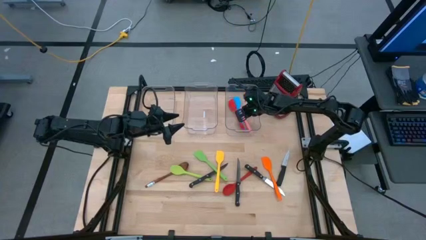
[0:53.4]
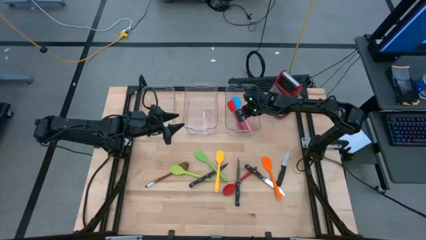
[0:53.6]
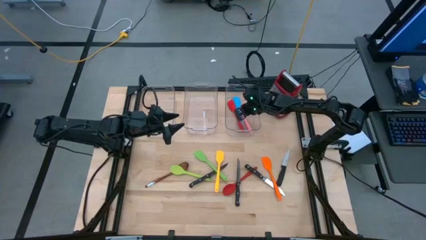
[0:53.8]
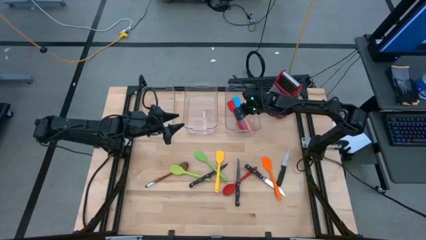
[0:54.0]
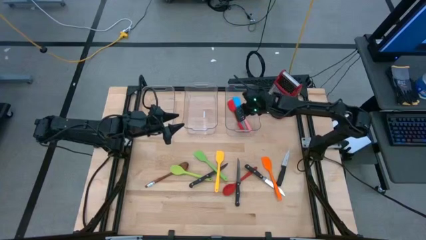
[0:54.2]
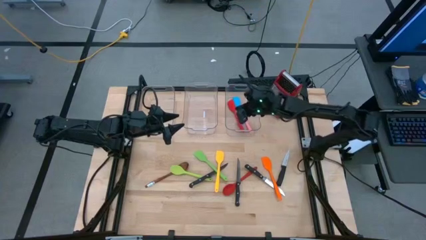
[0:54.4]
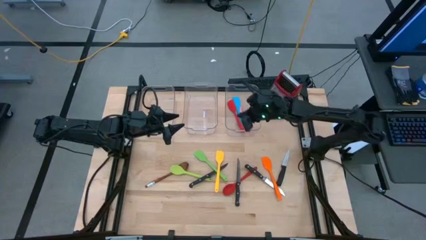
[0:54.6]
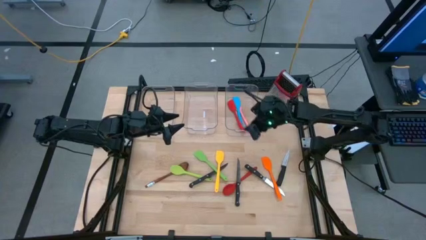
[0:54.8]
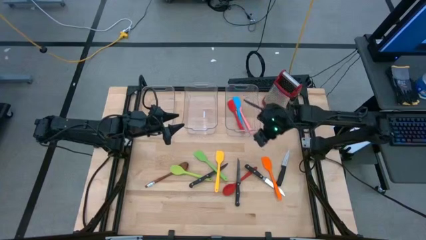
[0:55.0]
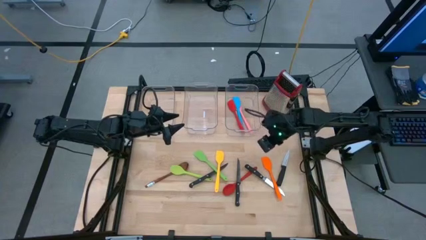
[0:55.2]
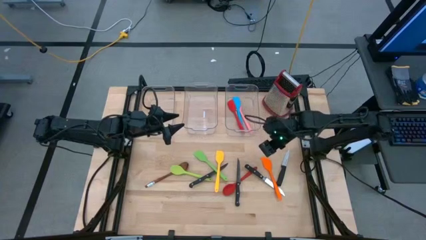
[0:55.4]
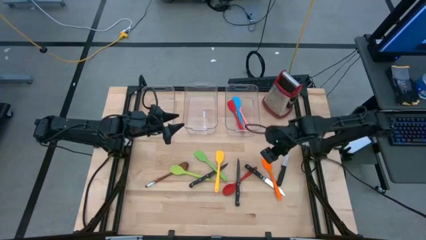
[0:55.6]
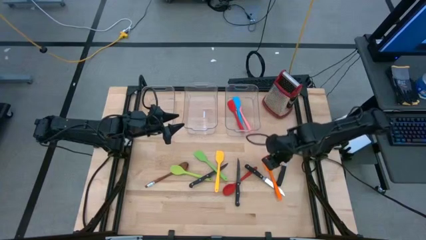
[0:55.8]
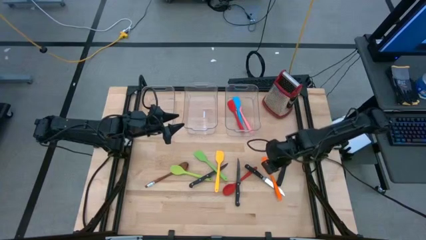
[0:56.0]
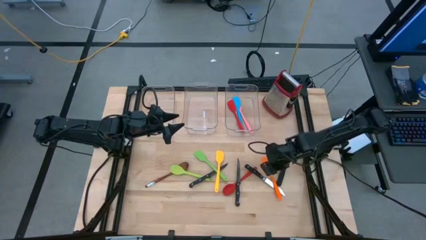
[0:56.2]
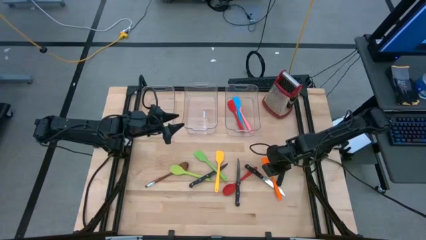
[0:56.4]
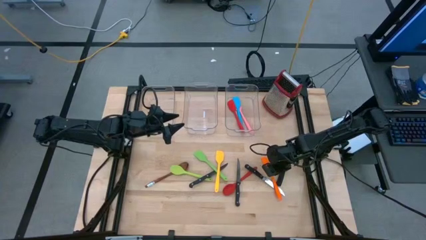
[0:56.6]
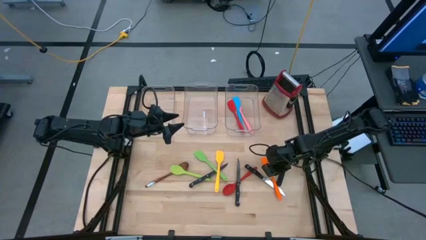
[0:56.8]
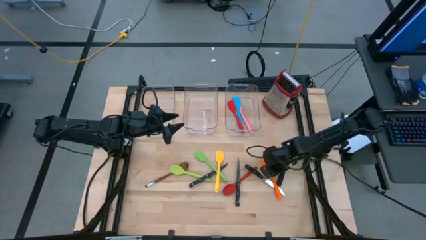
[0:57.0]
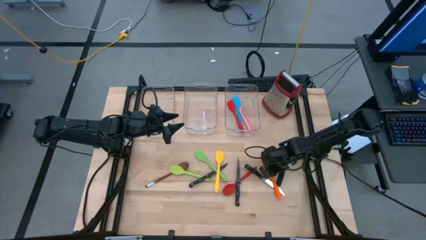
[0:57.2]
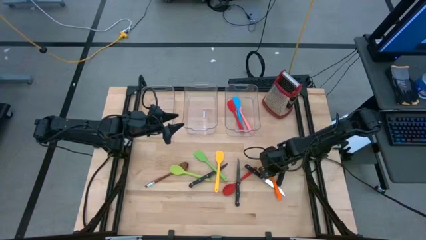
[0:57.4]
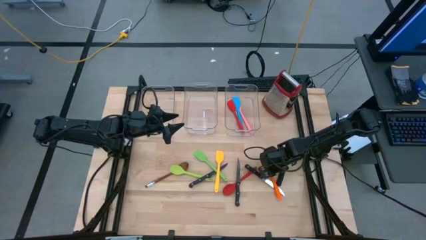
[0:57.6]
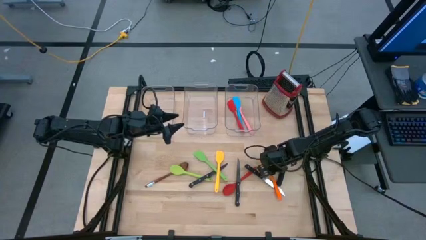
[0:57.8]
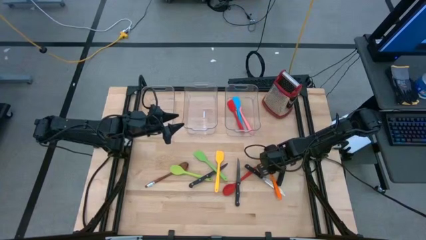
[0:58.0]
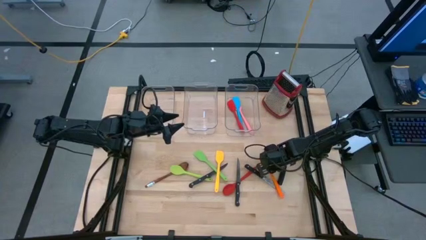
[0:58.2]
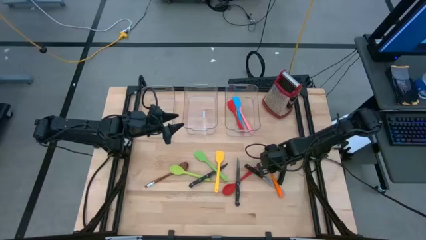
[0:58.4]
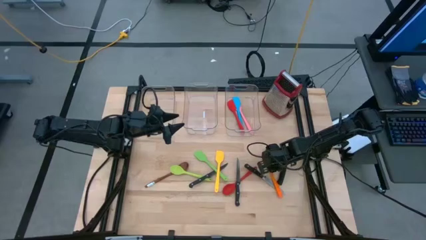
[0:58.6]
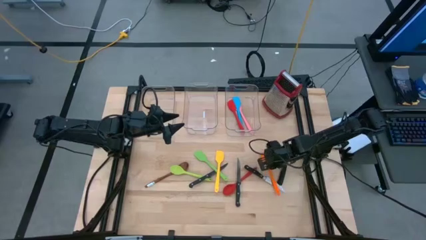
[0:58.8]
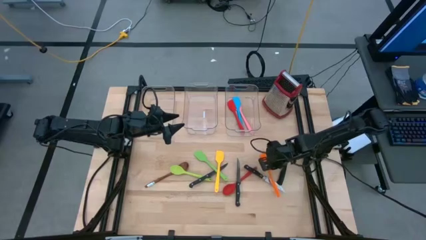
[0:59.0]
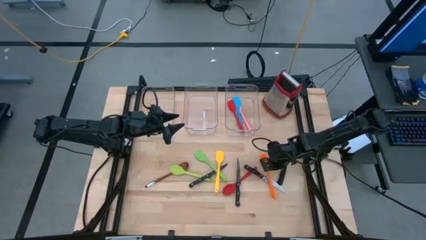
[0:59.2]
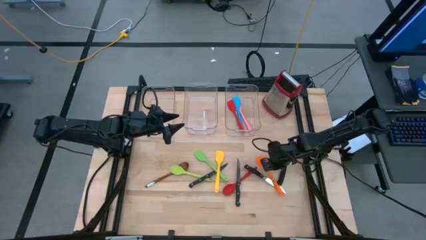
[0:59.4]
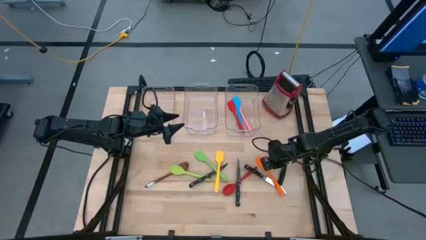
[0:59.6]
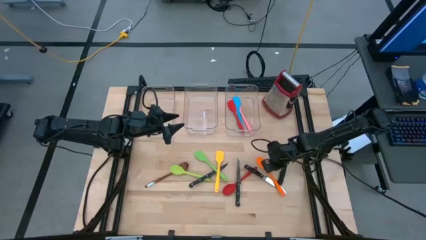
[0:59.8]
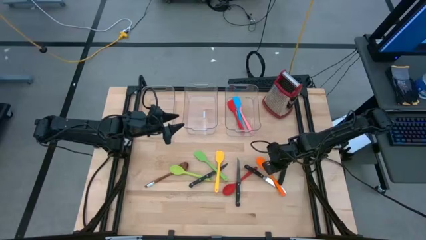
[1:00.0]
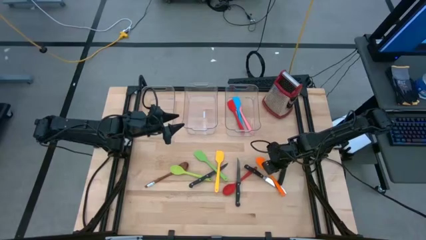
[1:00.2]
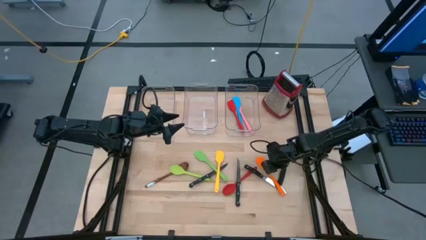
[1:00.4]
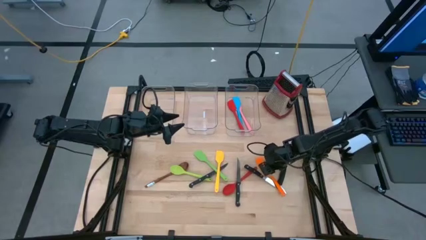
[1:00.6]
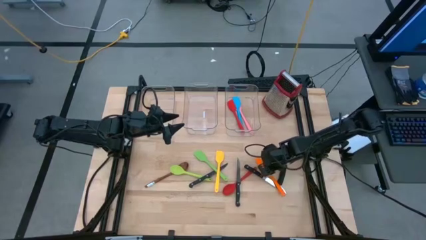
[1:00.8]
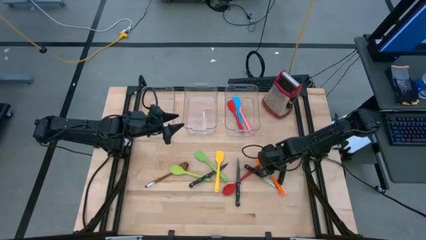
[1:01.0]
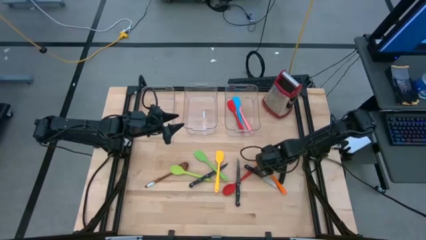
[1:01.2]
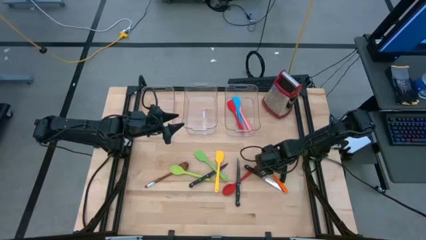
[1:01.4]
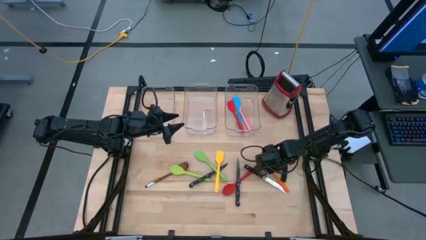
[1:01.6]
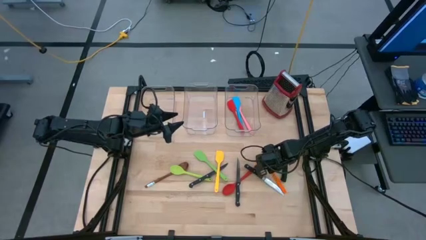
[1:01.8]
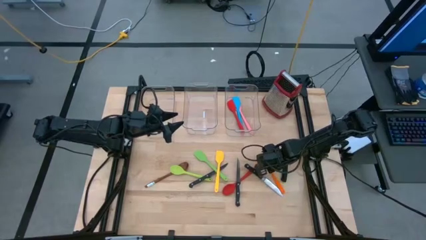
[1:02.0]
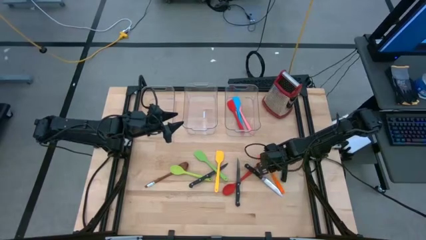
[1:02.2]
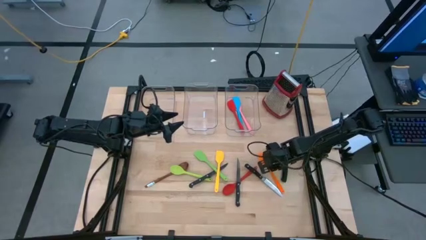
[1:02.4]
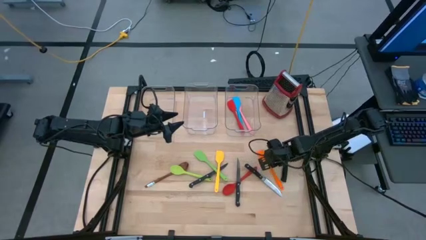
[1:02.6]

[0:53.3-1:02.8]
Task: Pick & Place Kitchen Items
Put the orange spatula into the right transparent bin

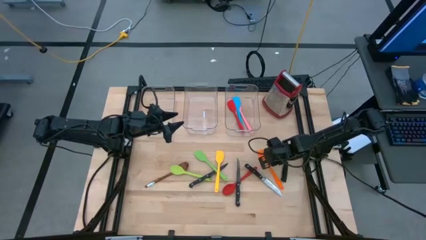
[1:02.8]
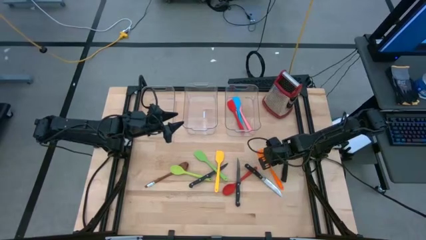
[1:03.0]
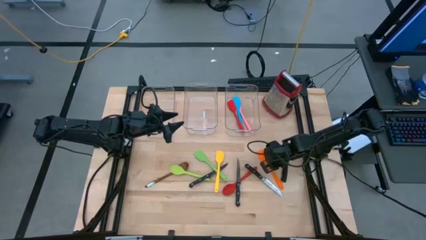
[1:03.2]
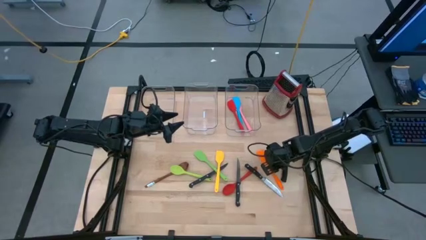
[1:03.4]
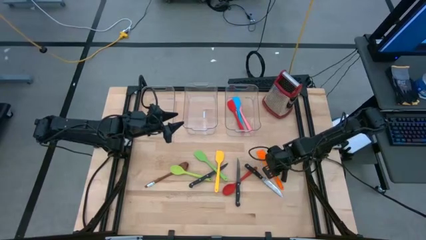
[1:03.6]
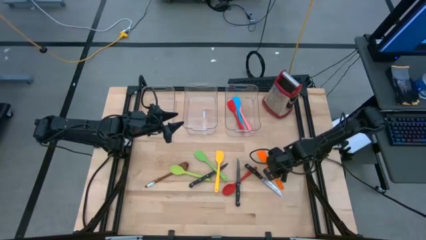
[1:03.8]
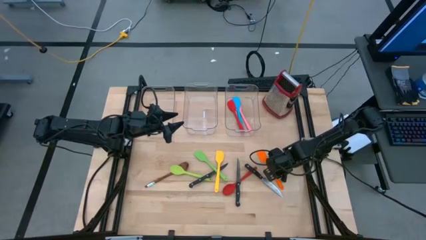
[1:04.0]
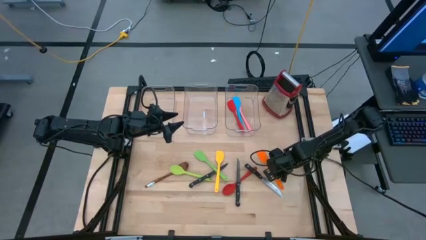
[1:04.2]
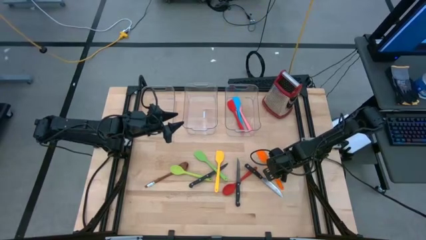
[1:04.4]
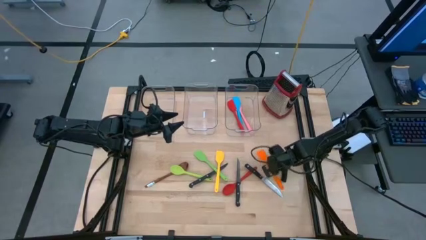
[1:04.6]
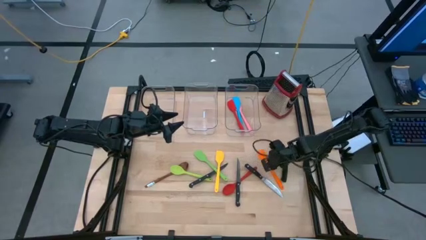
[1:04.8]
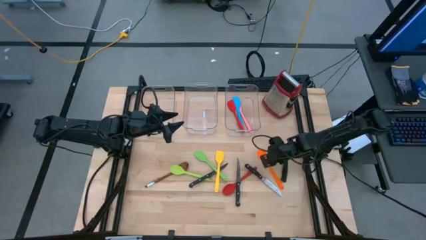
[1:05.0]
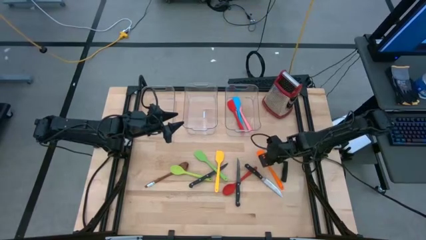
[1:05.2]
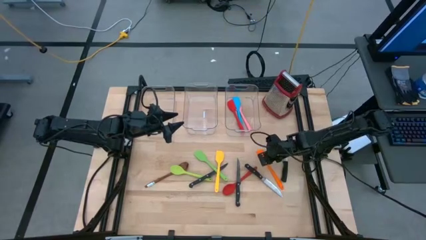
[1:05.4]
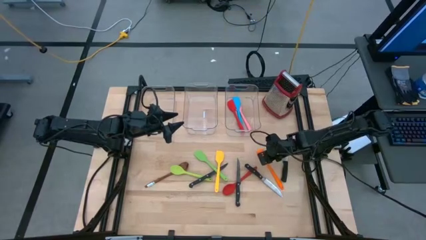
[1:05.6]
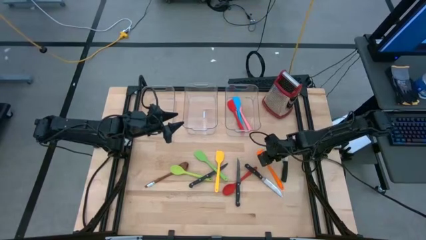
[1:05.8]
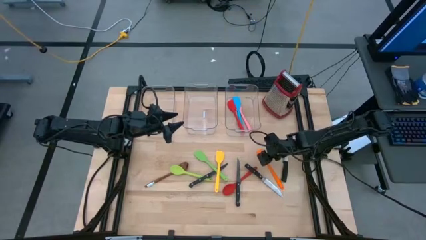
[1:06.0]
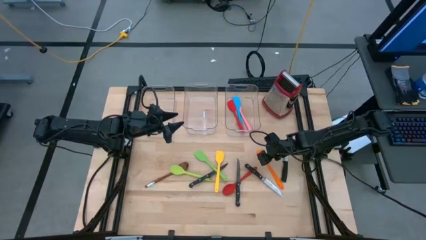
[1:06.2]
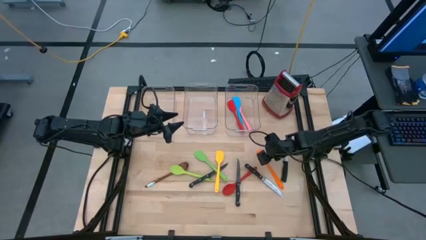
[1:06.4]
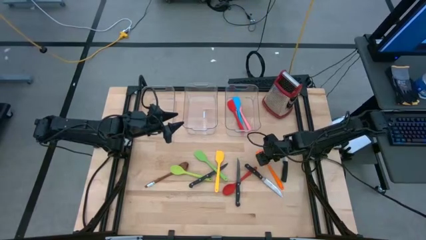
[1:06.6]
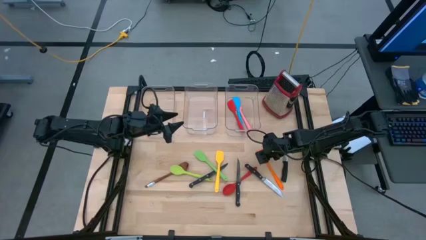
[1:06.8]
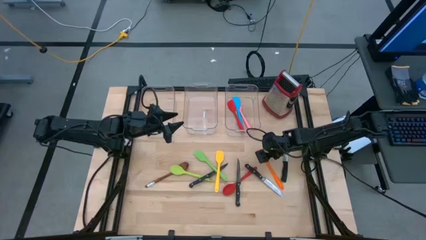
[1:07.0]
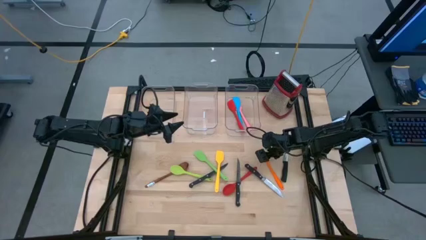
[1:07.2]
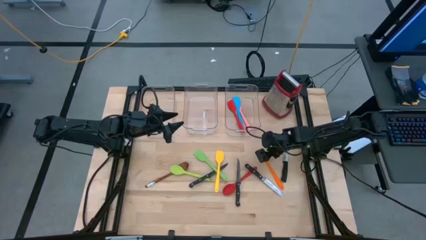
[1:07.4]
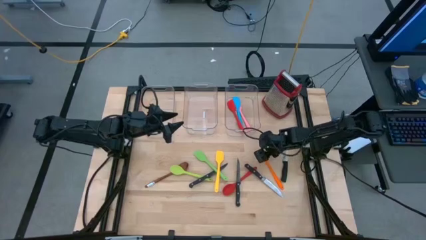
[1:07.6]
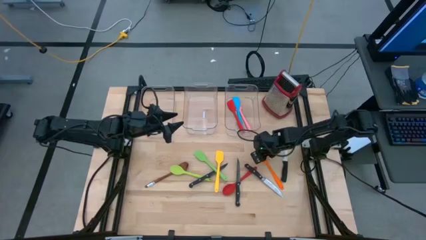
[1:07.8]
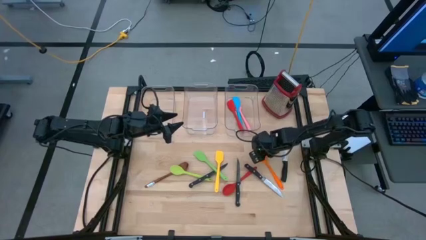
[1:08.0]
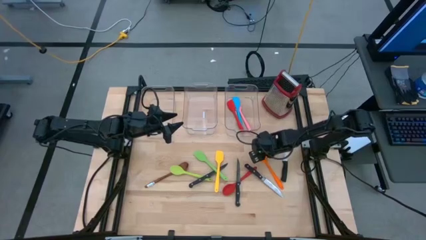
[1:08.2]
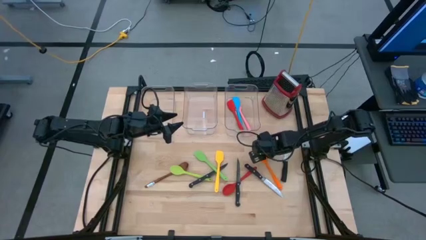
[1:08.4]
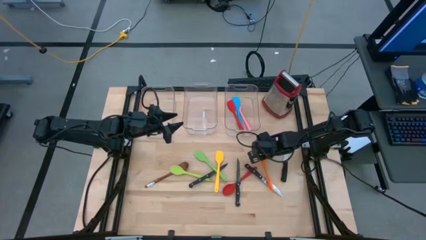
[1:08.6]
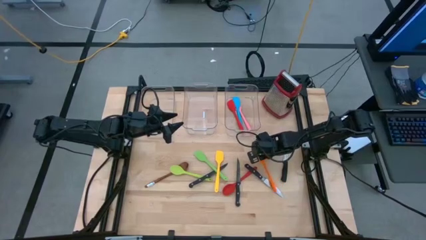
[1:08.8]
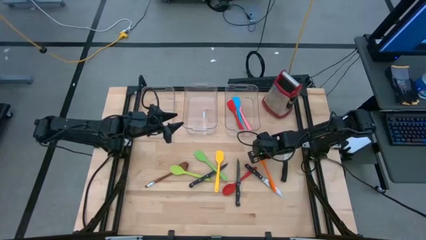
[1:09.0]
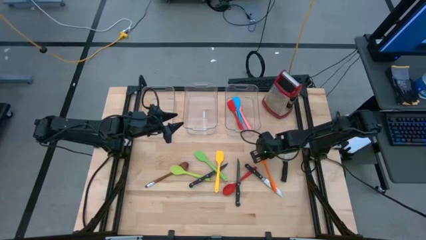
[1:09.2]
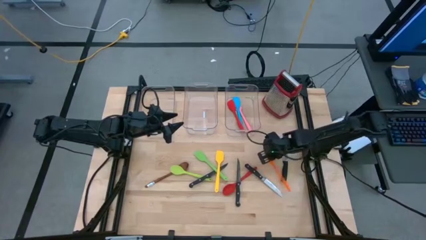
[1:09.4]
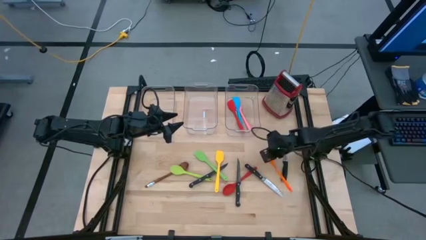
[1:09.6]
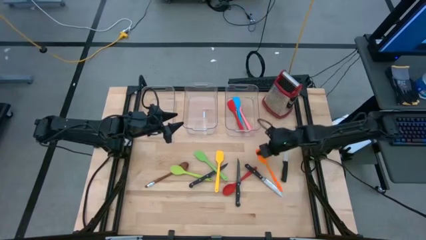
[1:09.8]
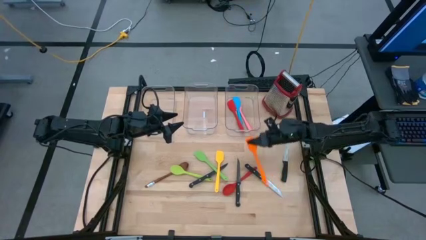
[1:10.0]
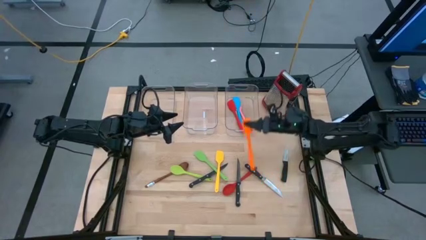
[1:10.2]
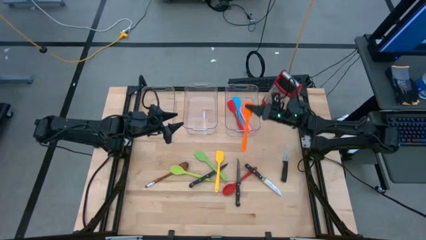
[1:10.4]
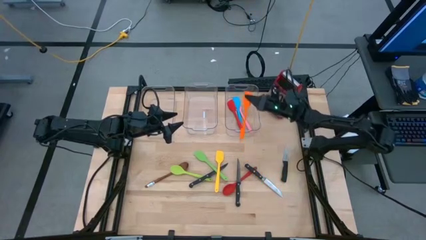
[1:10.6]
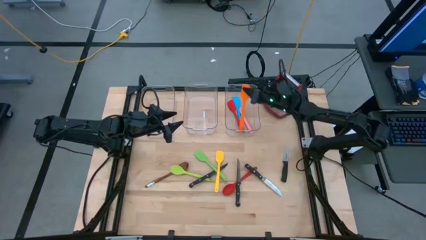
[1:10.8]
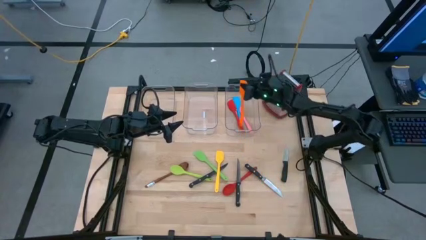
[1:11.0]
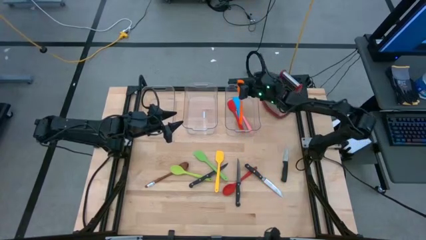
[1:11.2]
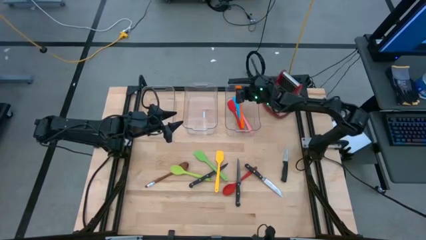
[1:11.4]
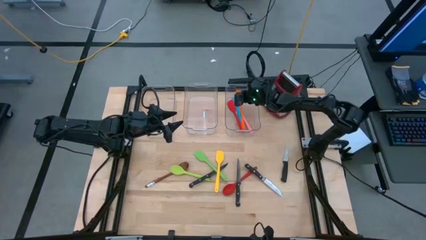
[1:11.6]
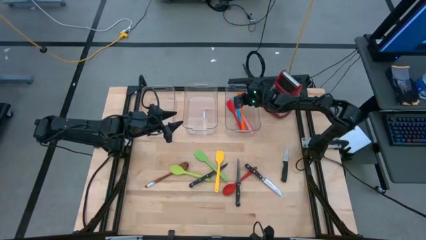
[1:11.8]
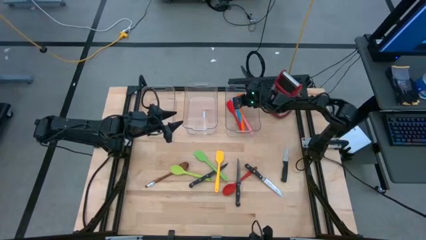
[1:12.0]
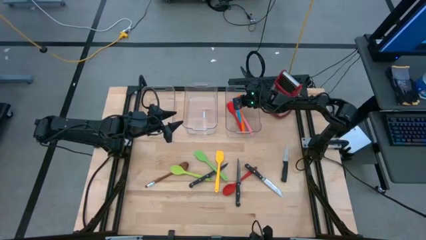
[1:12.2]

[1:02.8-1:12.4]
Put the orange spatula into the right transparent bin
